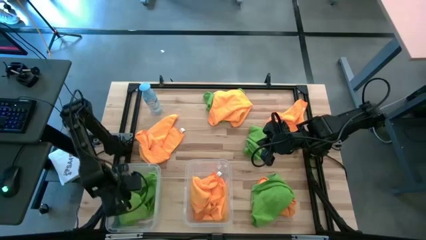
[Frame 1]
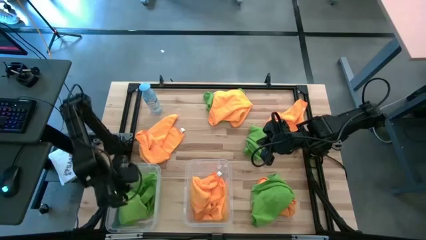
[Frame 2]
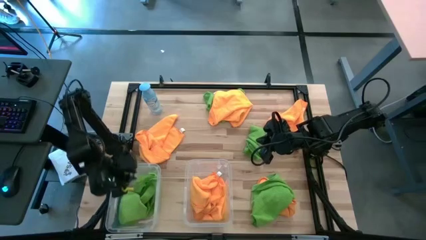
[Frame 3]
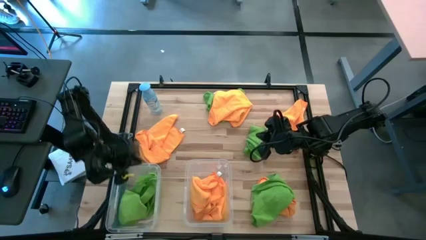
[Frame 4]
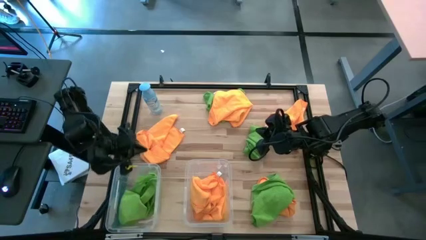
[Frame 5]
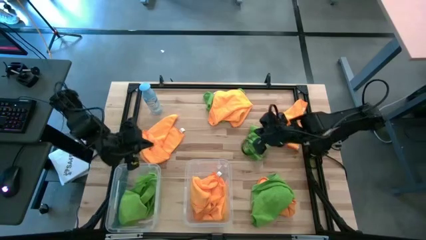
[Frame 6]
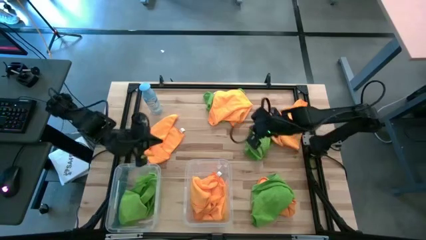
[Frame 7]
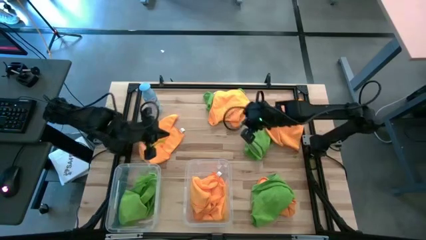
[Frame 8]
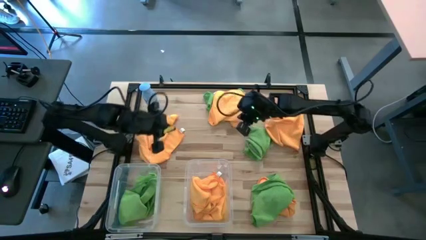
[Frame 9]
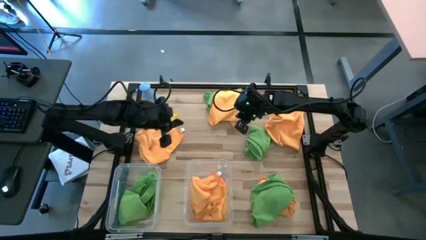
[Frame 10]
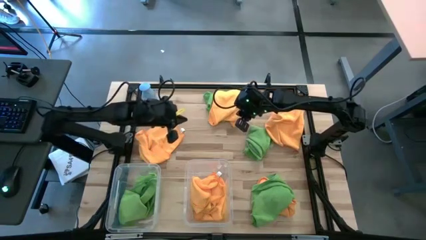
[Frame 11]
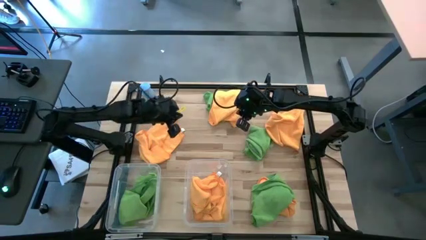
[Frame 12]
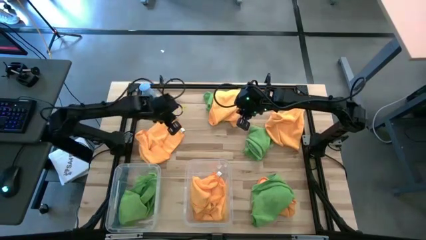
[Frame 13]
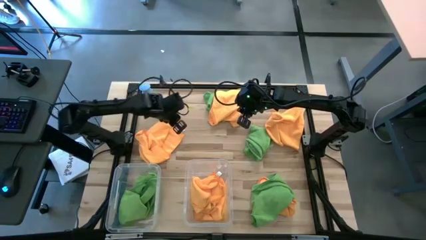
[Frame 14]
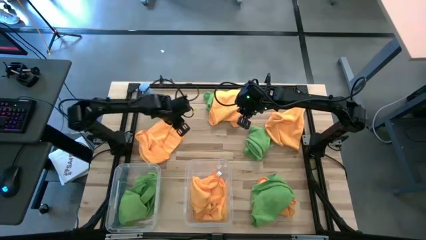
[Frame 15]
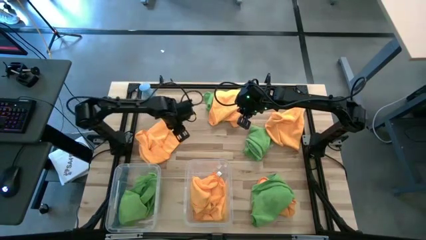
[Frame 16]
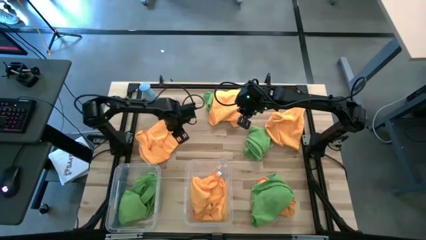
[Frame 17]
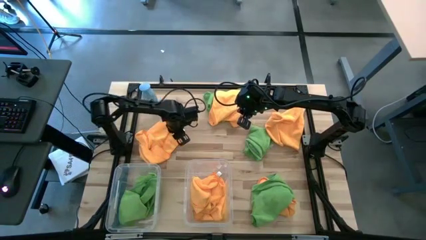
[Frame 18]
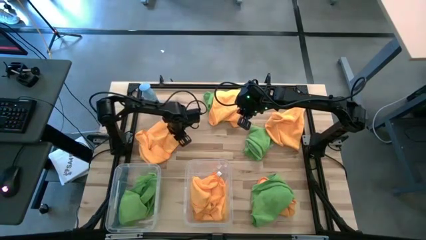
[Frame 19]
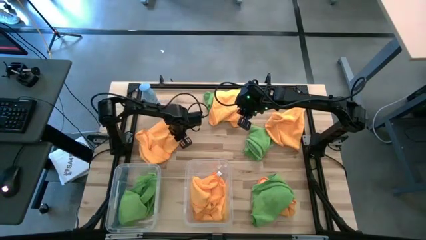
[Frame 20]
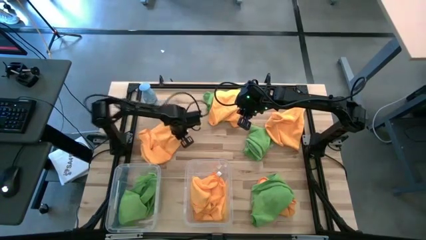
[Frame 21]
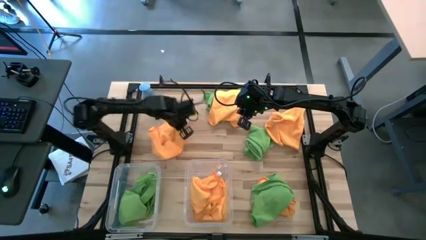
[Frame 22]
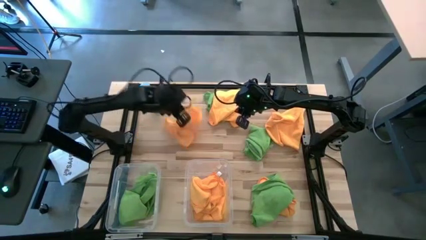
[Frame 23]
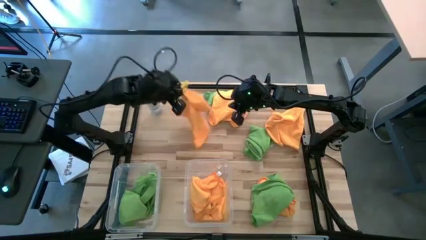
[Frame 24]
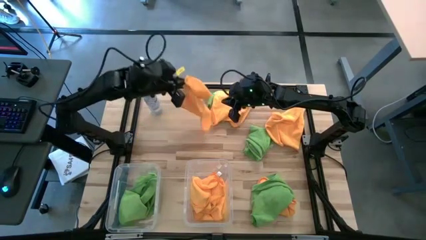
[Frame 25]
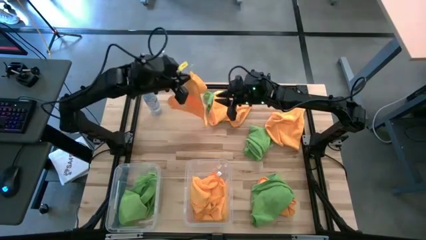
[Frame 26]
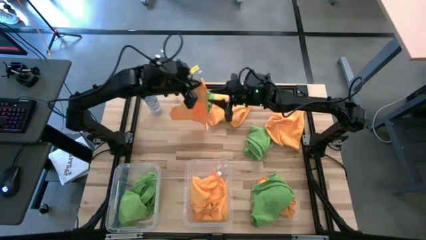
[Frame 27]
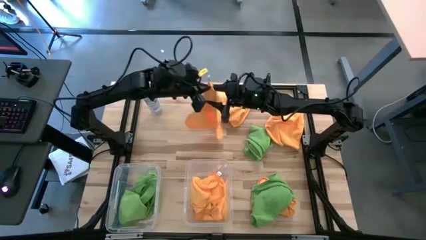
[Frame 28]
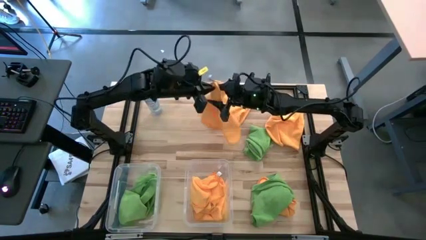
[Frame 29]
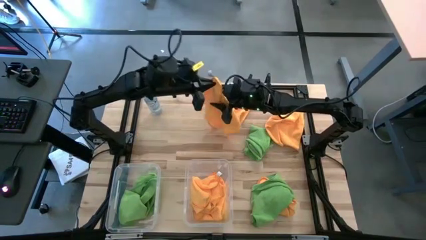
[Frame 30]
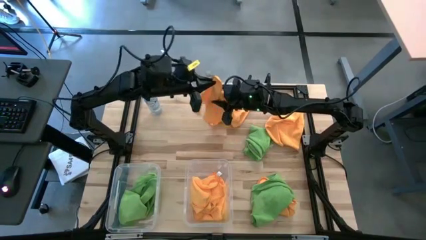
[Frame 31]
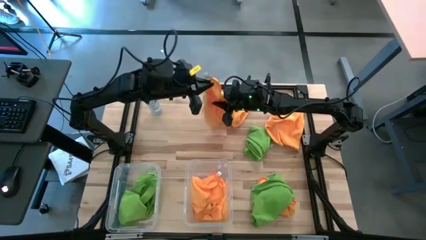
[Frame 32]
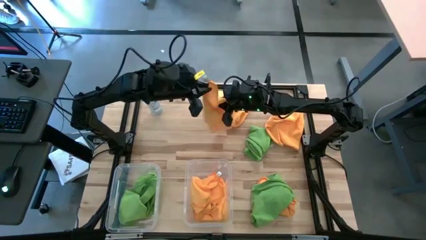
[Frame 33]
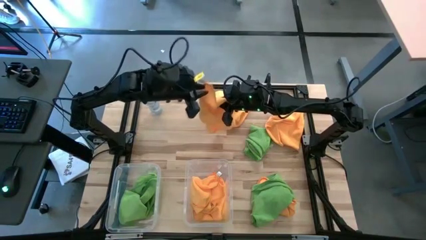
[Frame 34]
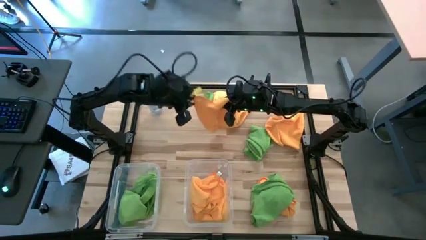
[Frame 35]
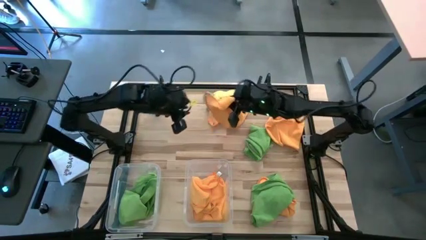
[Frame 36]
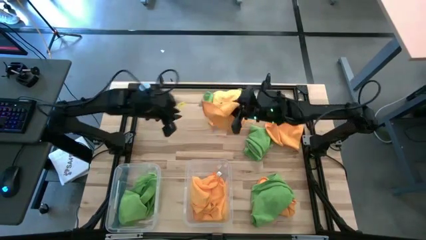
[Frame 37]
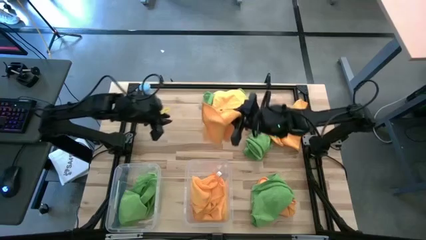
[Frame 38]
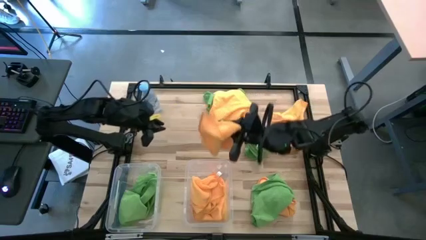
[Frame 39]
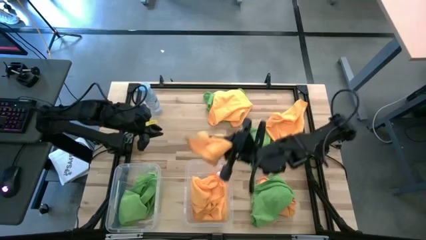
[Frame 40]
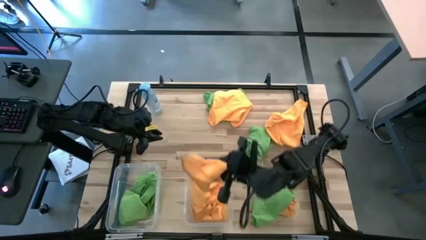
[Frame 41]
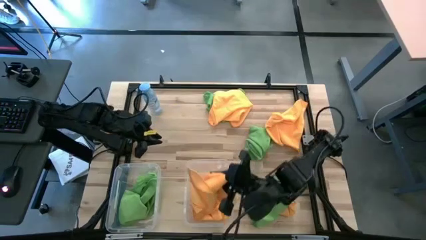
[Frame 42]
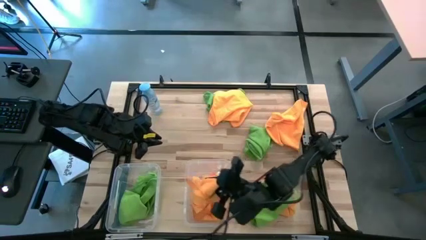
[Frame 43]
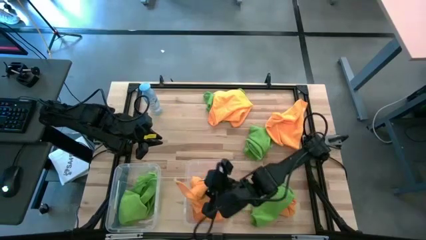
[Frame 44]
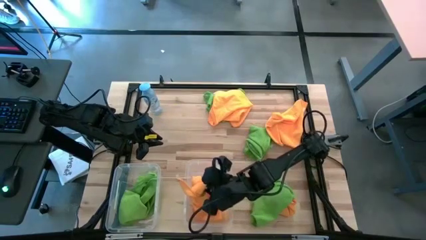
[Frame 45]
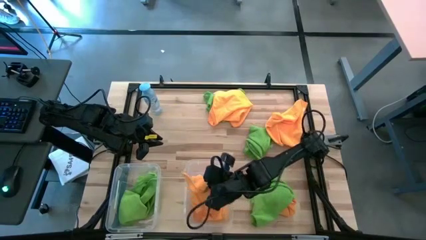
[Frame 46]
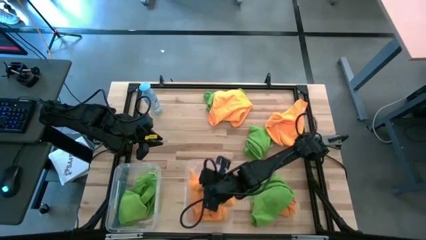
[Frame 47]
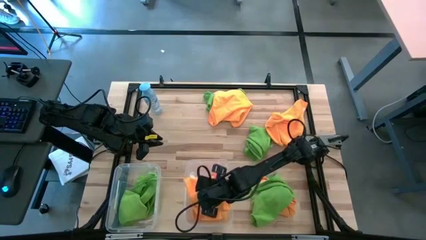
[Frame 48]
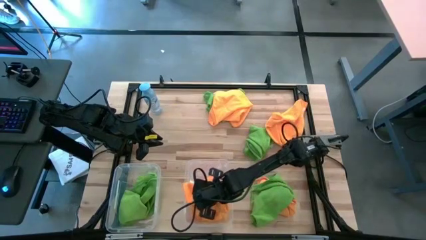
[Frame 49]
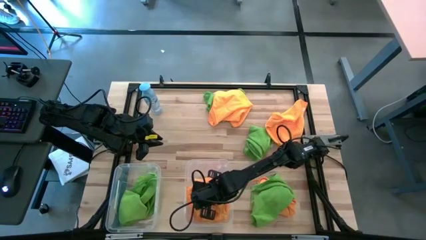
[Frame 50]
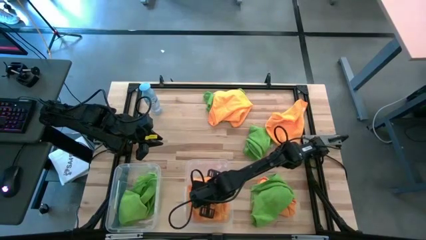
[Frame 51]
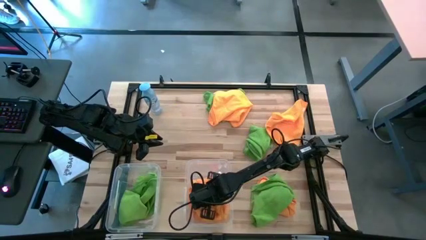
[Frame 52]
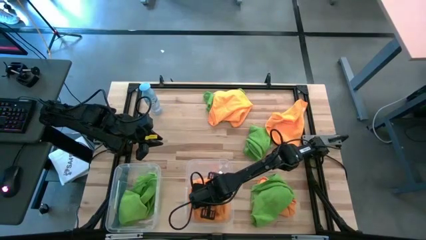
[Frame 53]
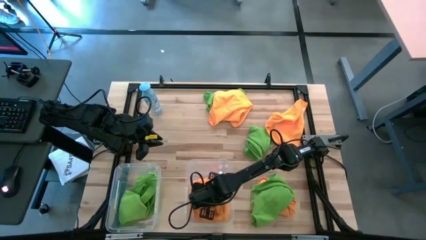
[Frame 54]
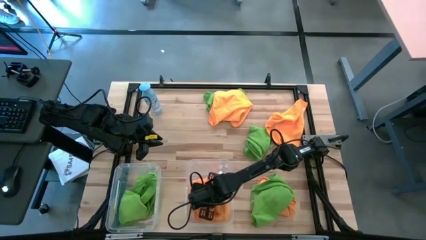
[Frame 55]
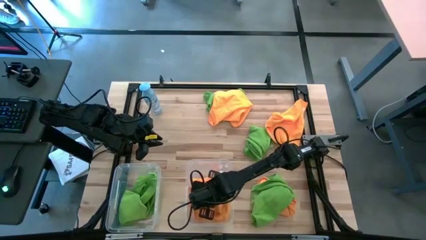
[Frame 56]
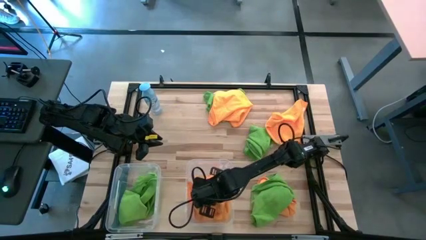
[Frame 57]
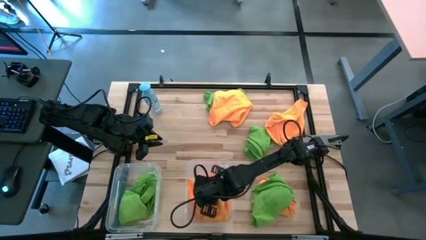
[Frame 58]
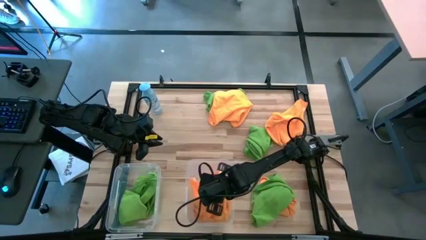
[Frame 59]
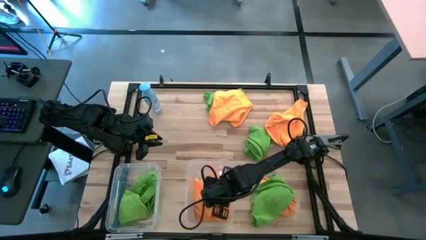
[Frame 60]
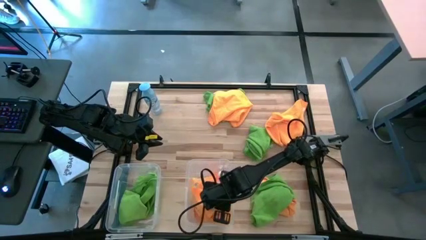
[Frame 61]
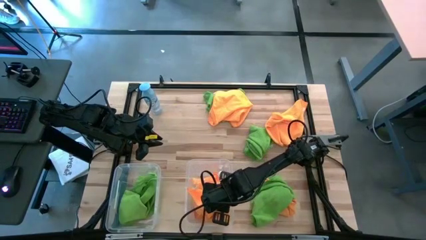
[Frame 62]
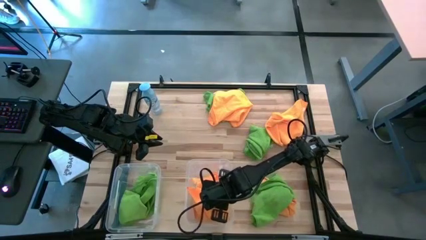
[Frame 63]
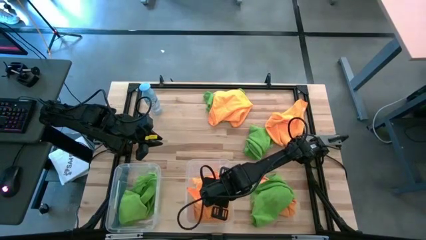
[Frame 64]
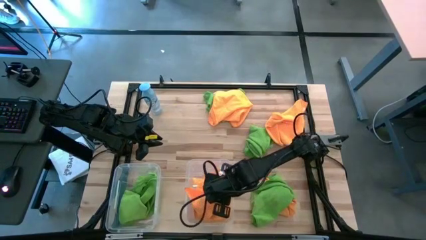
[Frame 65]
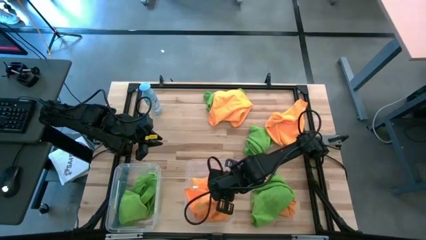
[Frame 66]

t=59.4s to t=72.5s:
Task: Sort microfiber towel by color & place in baskets
Put the orange towel into the right transparent bin

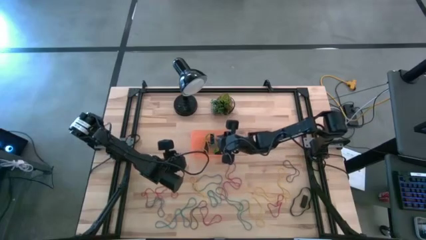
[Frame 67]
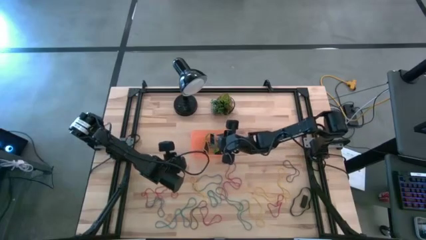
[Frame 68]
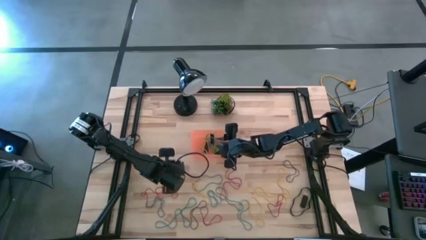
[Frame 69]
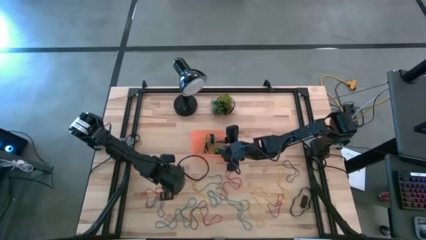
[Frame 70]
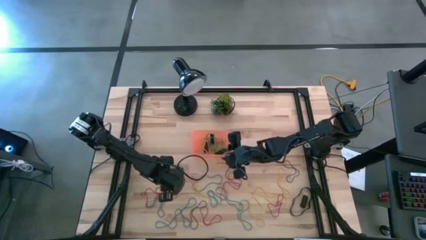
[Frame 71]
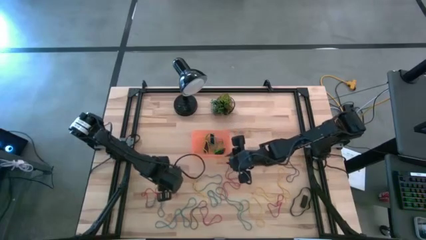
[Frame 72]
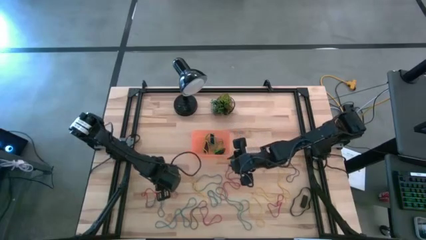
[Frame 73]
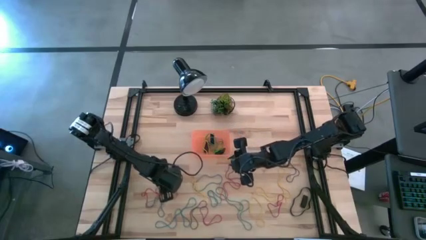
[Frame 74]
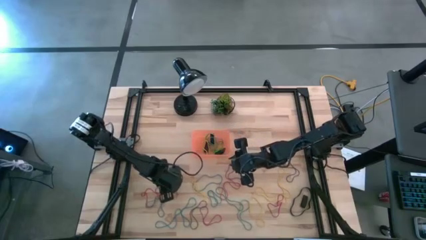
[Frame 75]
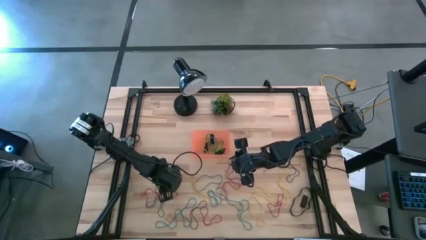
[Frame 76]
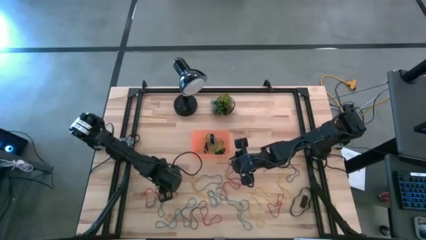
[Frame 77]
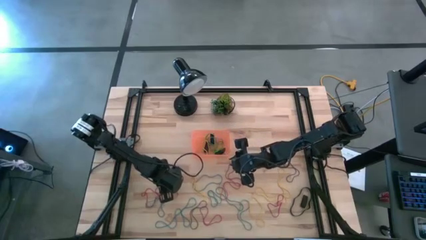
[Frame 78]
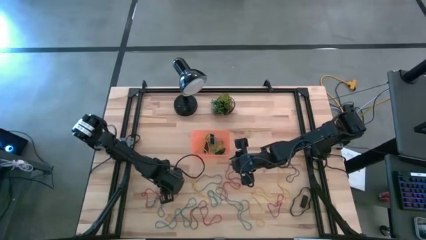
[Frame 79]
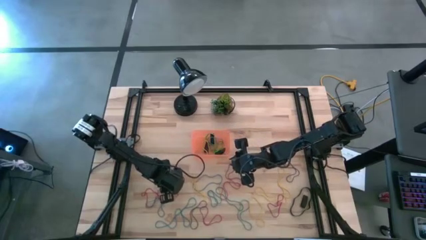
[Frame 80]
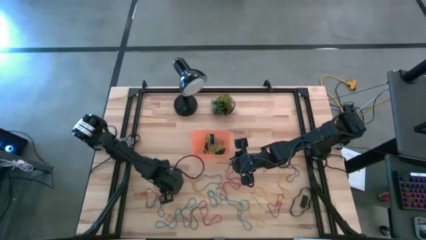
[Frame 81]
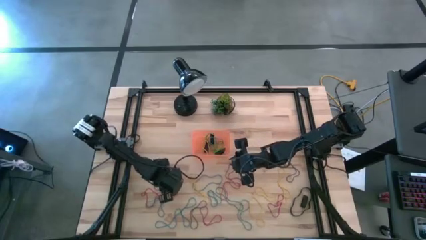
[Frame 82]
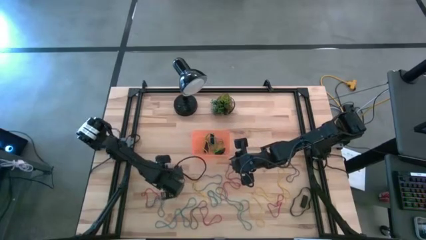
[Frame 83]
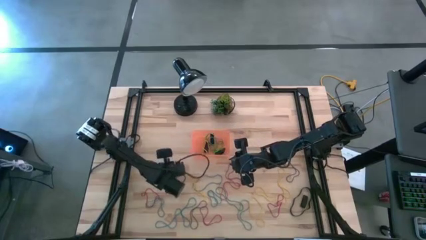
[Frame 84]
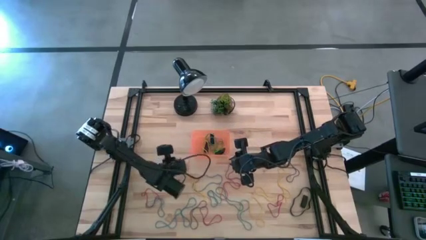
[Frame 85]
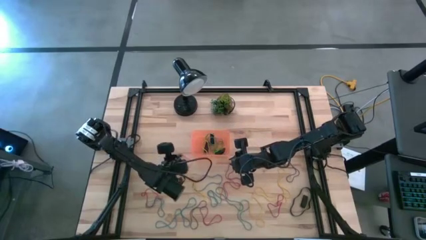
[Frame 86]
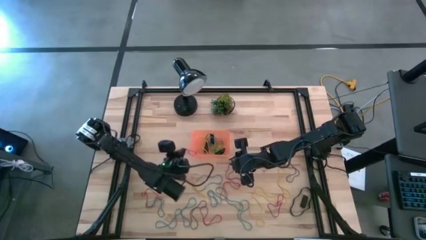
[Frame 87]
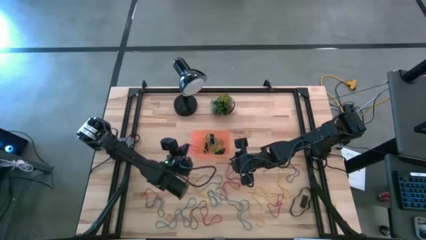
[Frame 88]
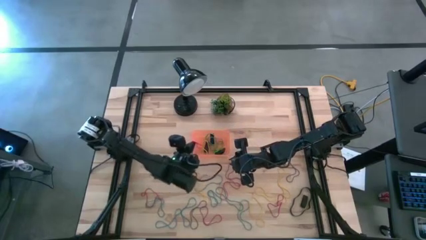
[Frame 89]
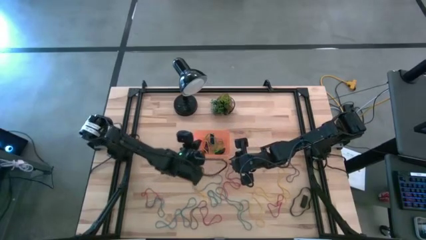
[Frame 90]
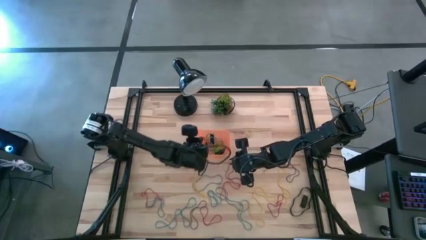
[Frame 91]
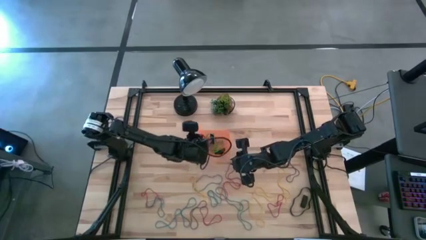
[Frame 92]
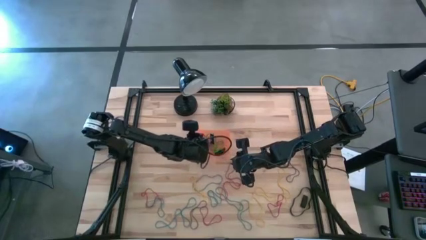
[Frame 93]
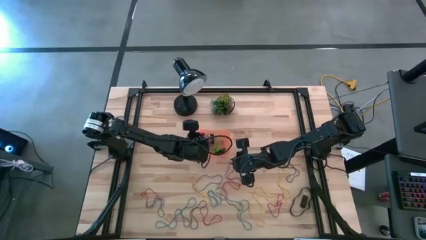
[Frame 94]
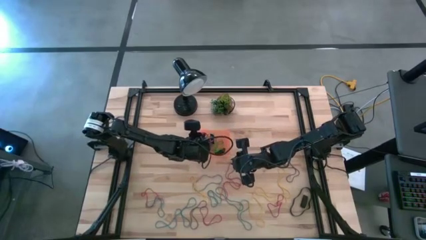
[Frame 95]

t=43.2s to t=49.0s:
Task: Pick and place rubber bands into bin
Put the red rubberband into the orange bin
